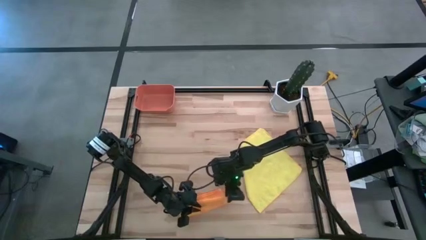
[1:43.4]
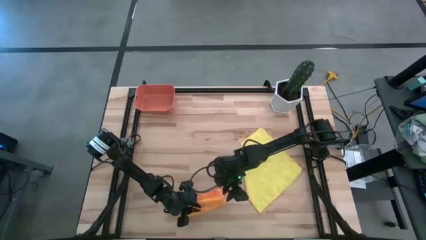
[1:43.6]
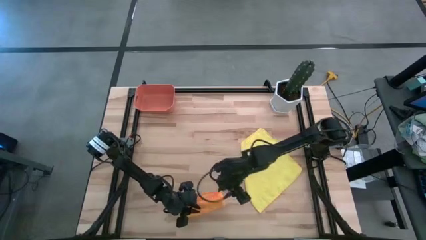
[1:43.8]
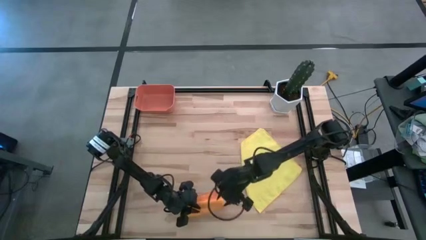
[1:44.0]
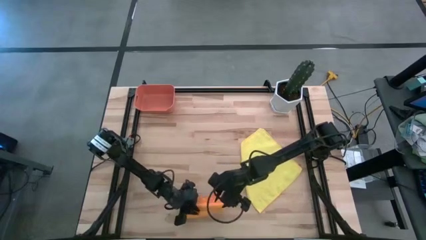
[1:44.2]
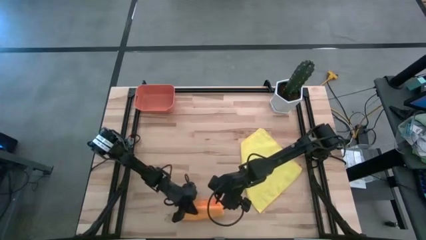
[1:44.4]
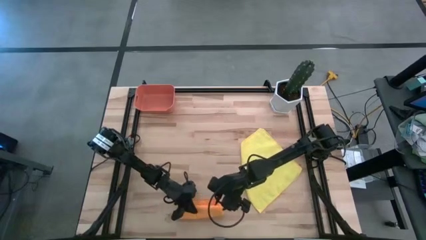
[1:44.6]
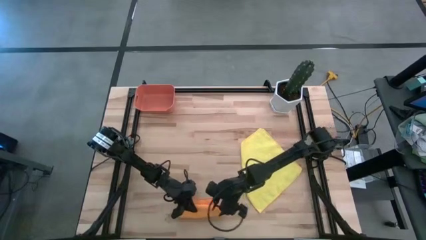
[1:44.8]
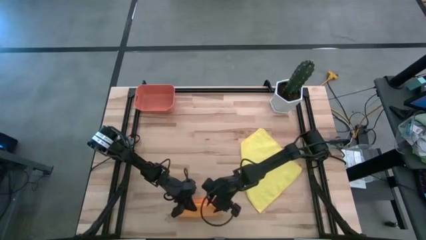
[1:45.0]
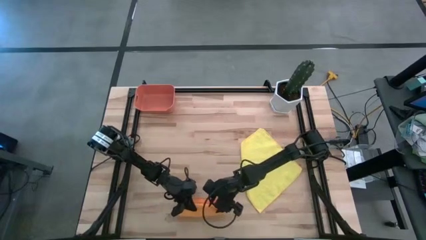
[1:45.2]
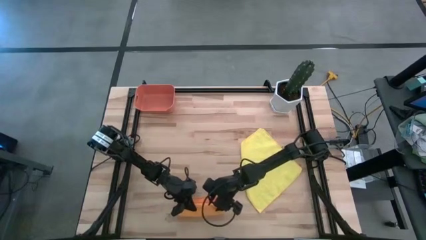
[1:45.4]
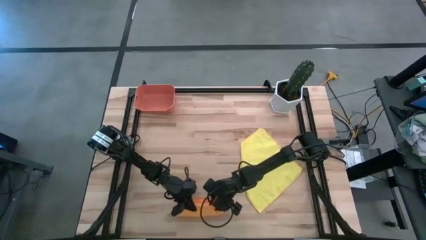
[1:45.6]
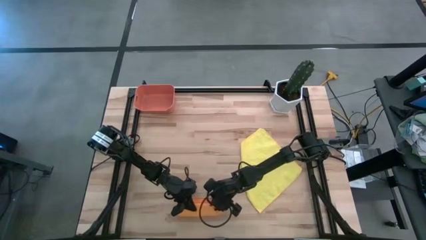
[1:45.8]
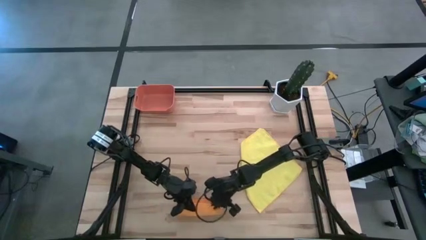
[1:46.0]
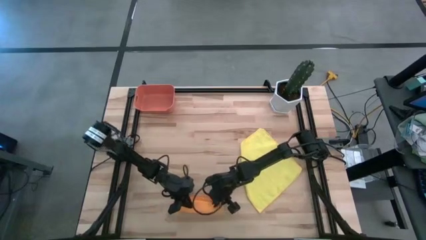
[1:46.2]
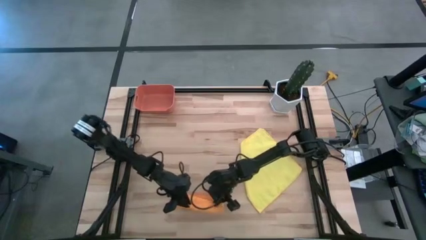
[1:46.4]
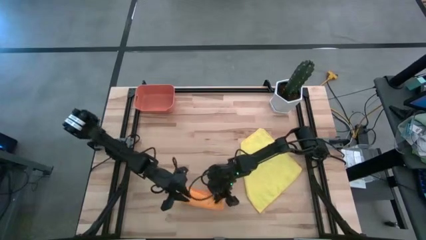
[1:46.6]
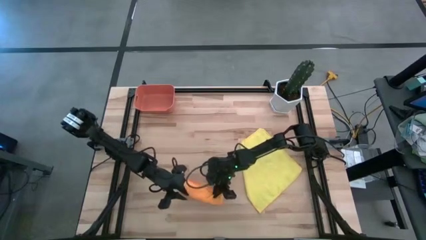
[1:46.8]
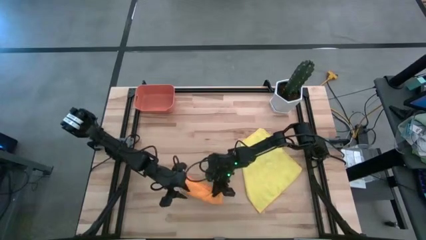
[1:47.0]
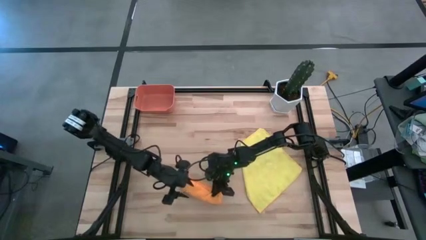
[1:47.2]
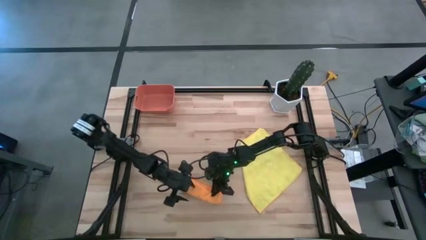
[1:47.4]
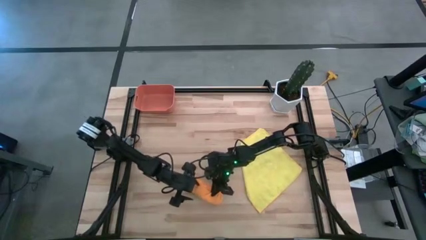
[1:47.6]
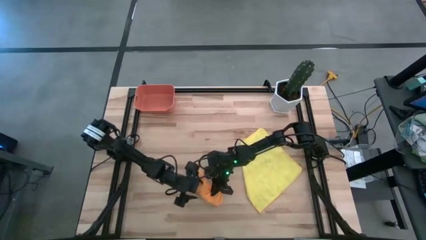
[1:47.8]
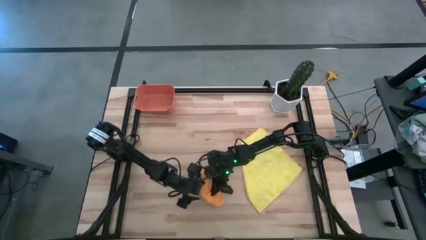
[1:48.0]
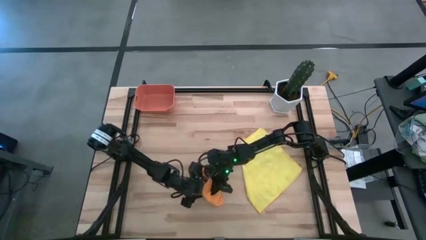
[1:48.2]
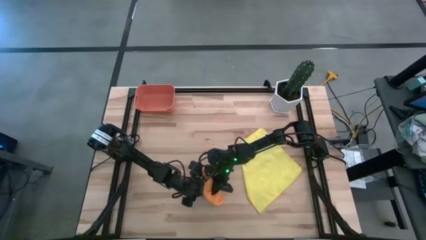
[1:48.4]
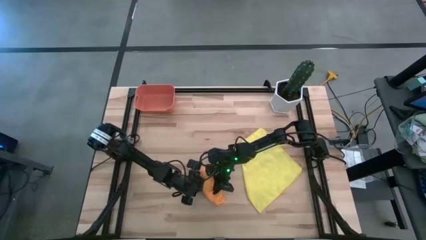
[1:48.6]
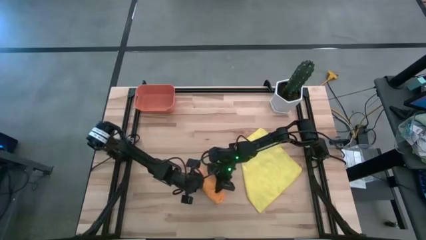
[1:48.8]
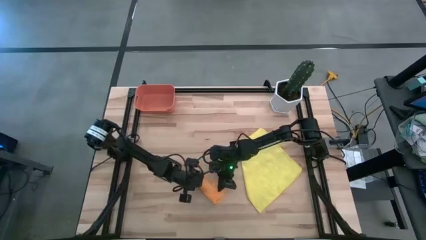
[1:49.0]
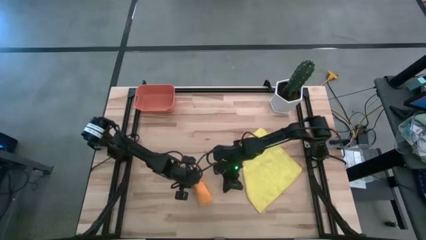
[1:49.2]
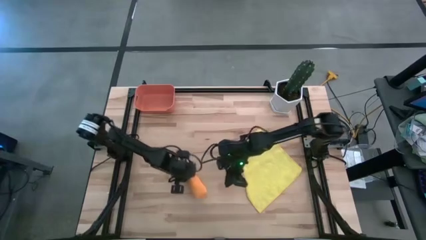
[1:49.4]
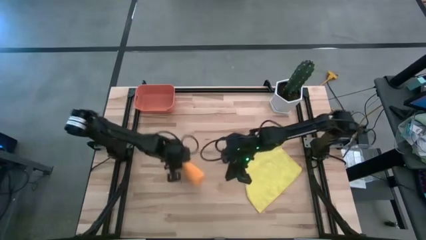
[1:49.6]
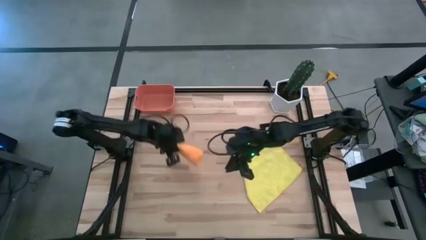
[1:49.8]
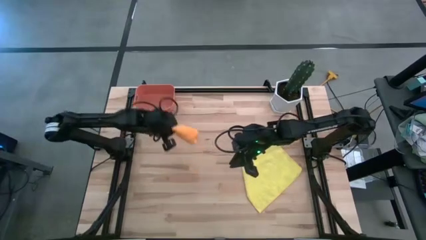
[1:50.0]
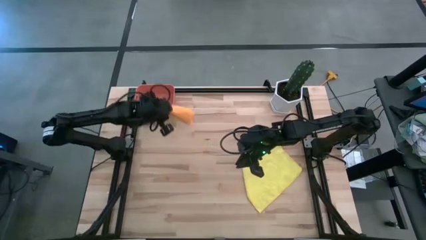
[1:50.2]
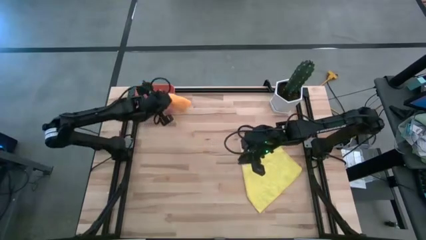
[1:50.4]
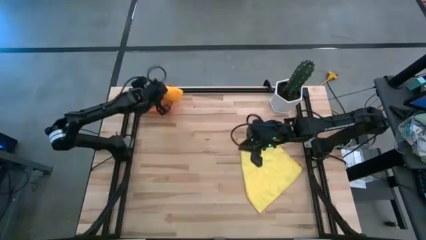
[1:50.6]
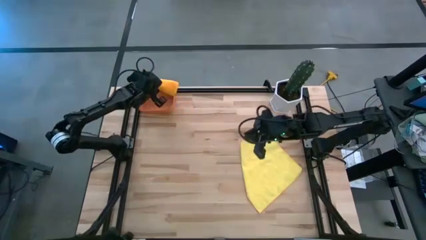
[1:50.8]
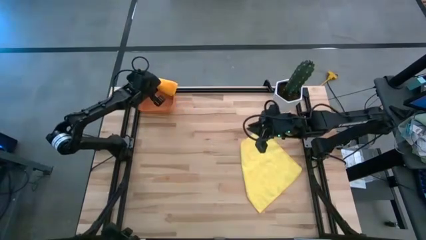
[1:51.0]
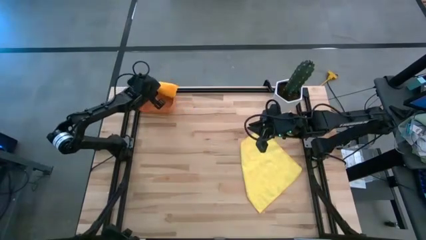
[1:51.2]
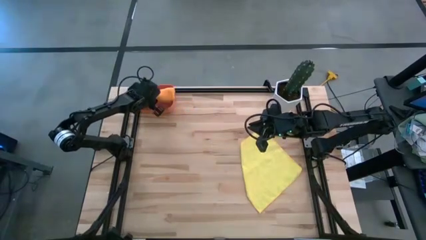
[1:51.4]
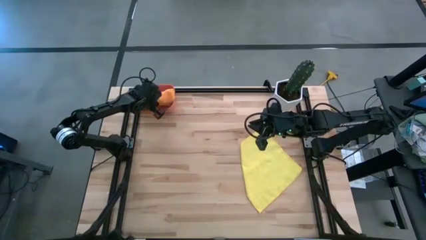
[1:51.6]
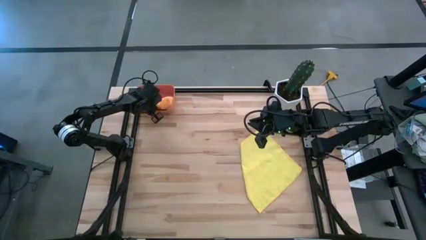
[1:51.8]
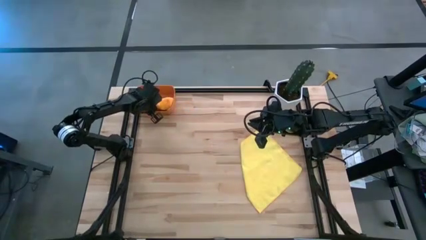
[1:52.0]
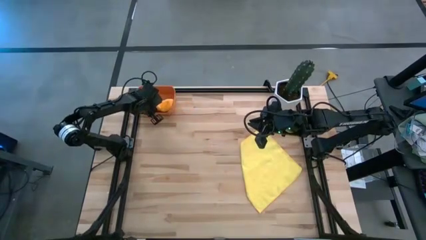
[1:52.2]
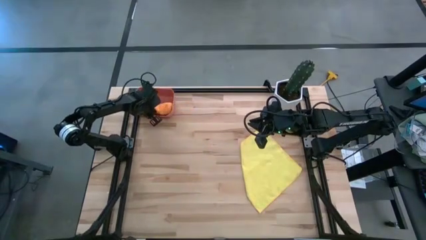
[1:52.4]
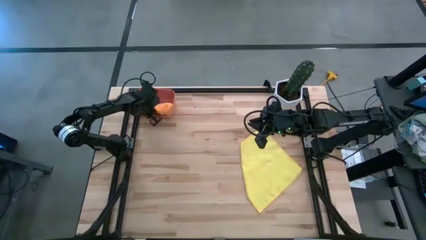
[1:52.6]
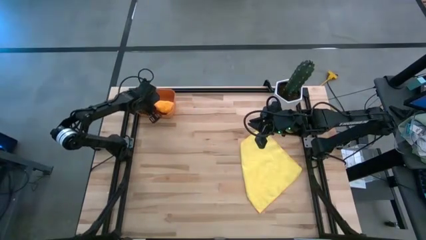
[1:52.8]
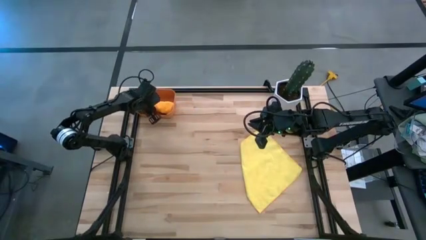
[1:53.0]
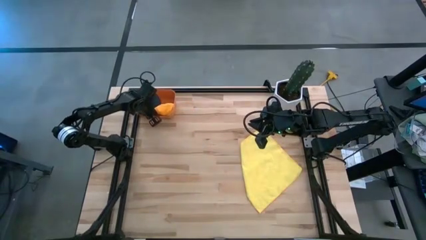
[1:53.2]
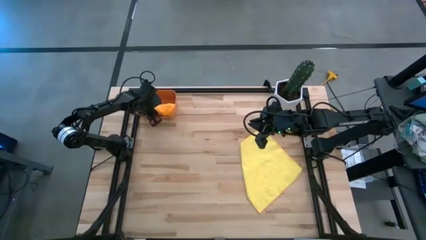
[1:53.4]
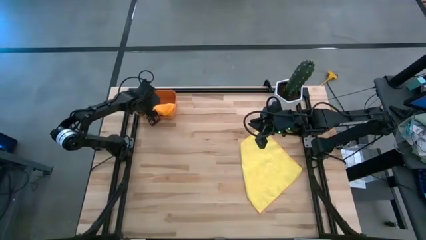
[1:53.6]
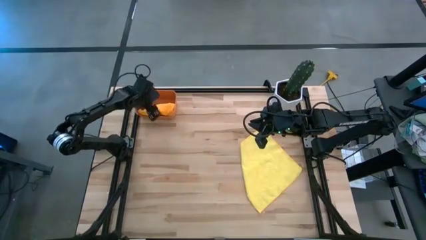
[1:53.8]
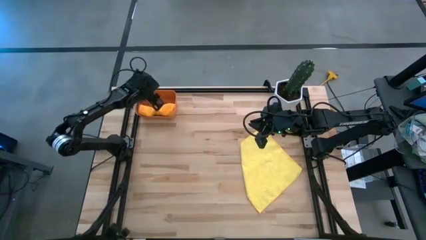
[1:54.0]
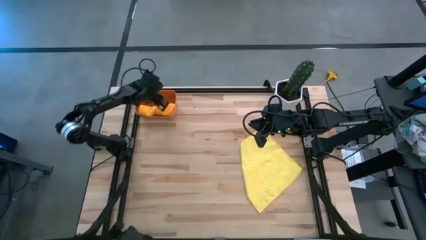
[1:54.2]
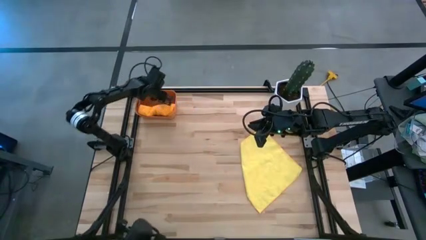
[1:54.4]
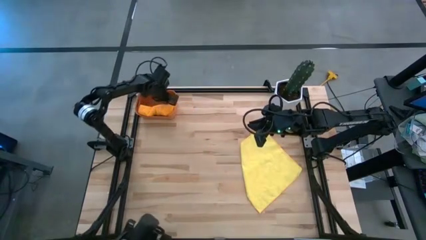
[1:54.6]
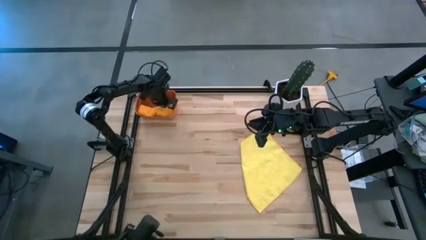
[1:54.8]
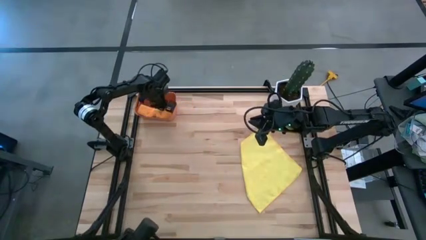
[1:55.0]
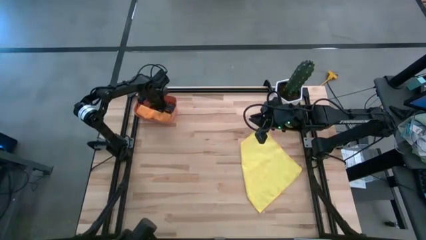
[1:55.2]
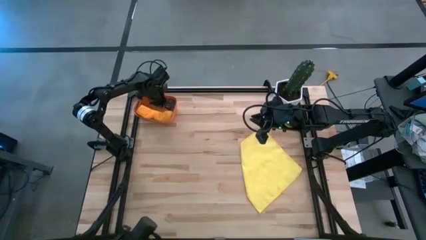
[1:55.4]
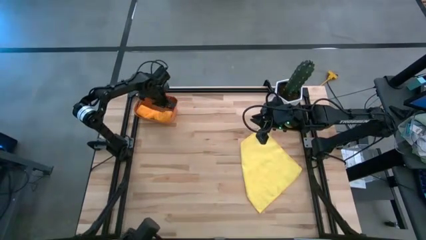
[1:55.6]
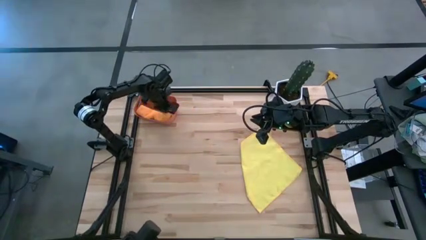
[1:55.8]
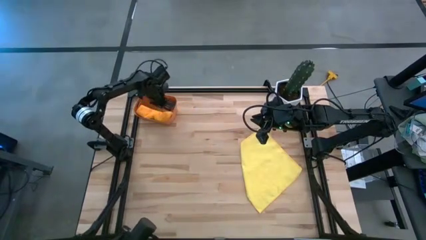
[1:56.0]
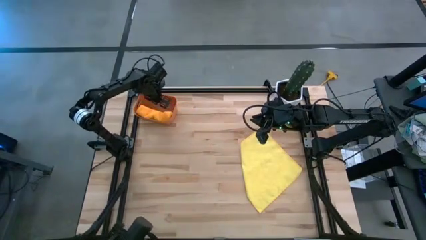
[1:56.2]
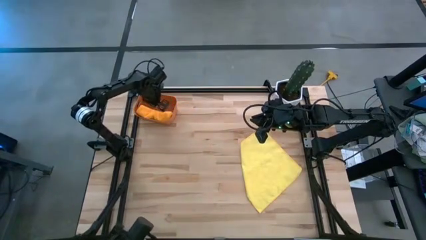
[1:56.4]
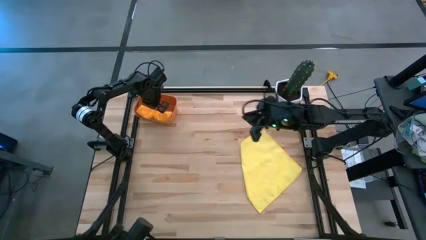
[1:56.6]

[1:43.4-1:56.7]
Task: Roll microfiber towels into tight, uniform cylinder then place into a basket
Put the rolled orange towel into the orange bin
